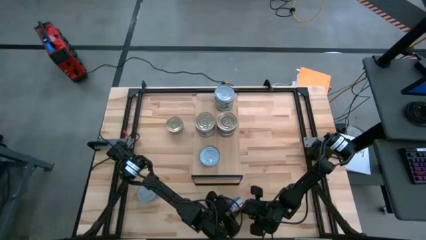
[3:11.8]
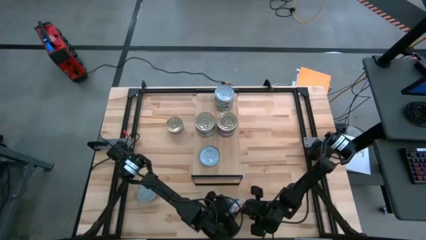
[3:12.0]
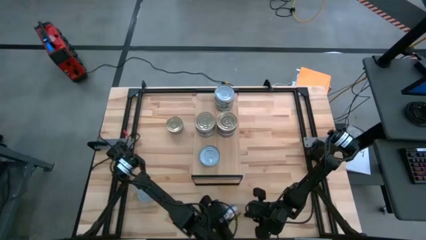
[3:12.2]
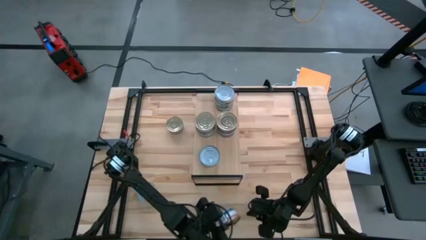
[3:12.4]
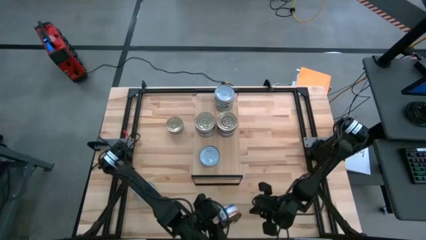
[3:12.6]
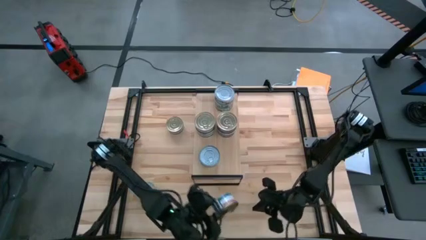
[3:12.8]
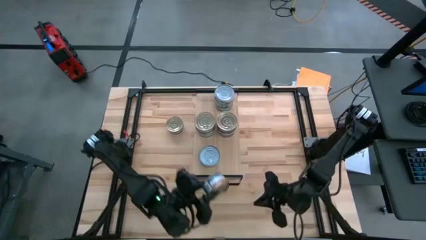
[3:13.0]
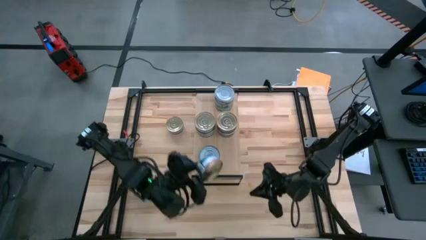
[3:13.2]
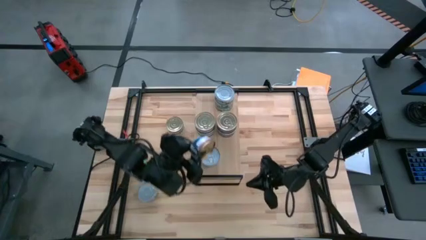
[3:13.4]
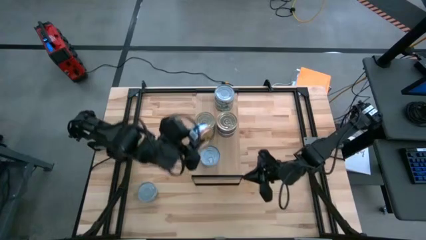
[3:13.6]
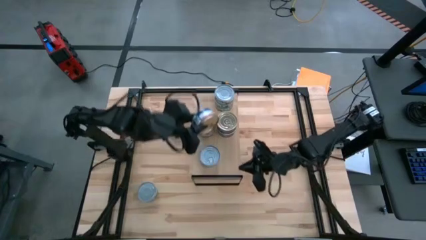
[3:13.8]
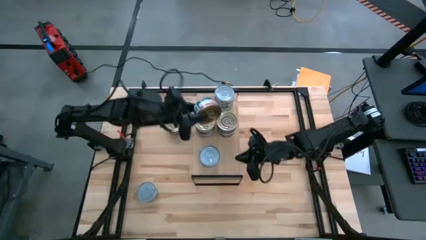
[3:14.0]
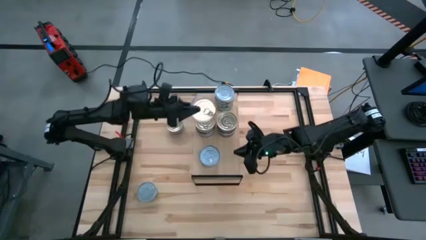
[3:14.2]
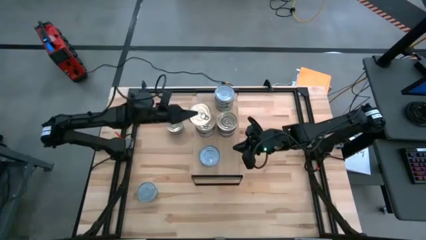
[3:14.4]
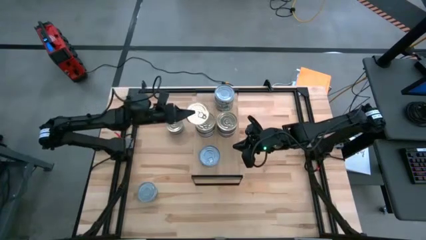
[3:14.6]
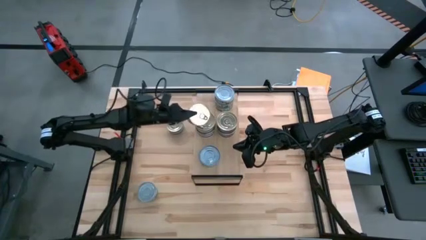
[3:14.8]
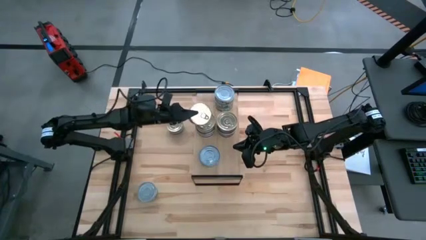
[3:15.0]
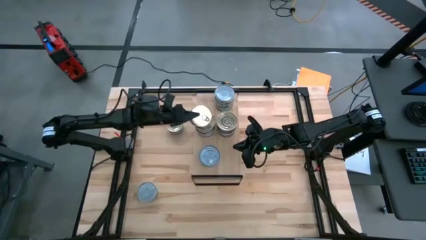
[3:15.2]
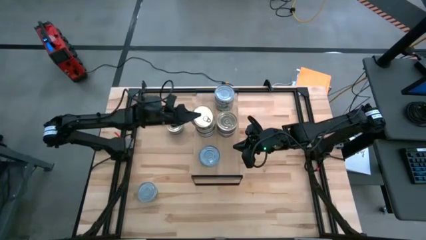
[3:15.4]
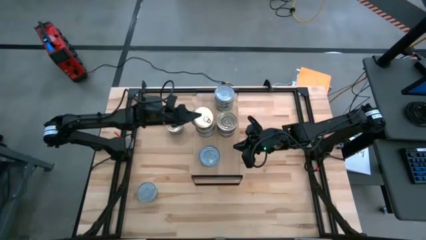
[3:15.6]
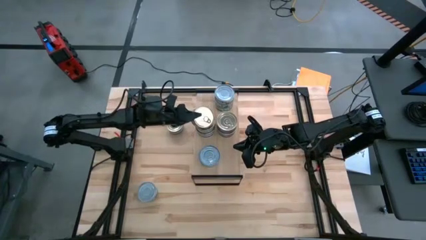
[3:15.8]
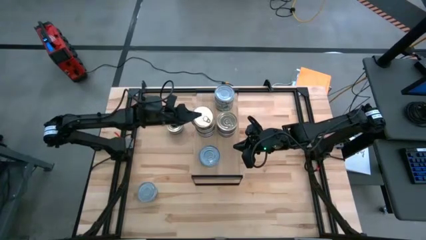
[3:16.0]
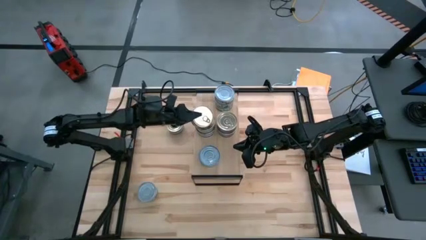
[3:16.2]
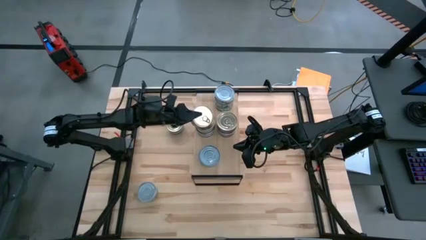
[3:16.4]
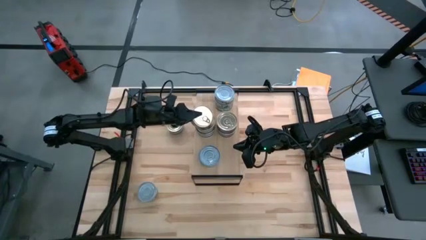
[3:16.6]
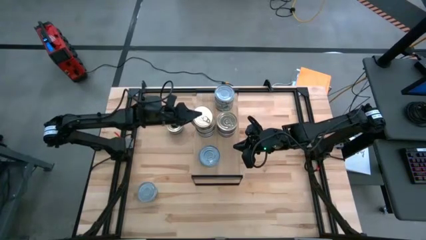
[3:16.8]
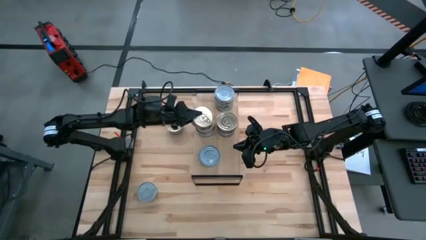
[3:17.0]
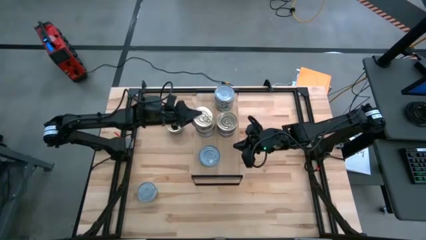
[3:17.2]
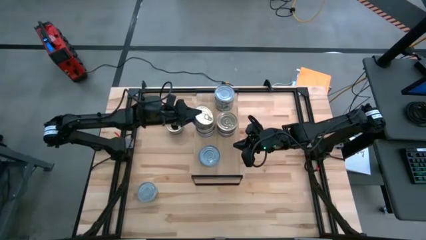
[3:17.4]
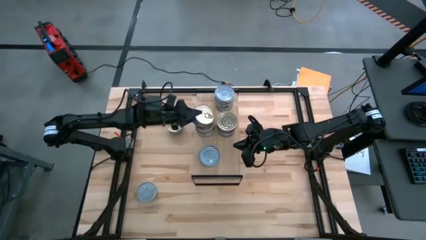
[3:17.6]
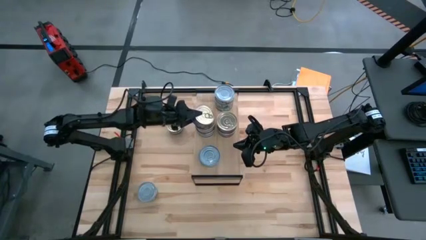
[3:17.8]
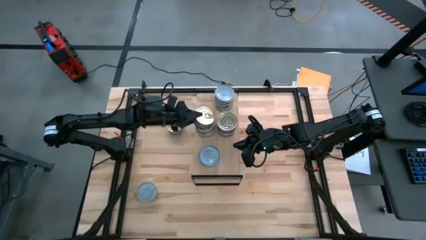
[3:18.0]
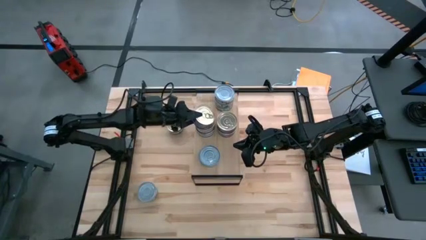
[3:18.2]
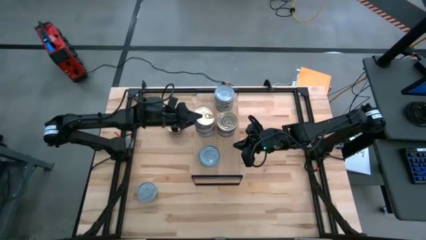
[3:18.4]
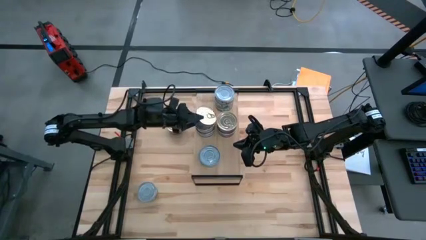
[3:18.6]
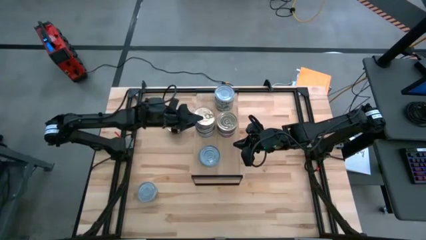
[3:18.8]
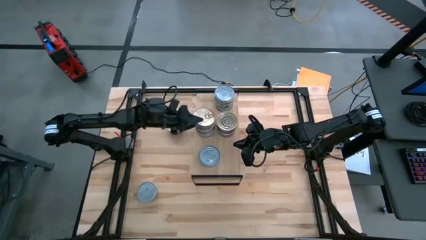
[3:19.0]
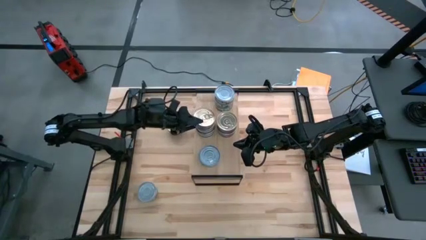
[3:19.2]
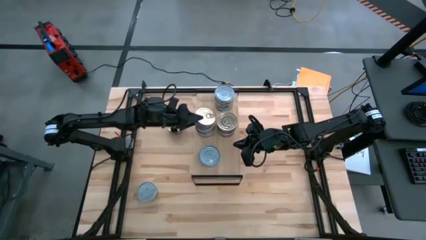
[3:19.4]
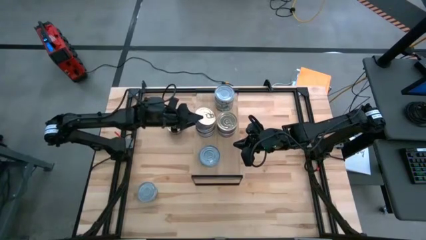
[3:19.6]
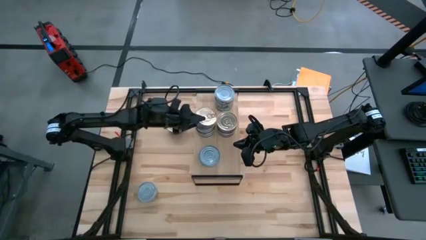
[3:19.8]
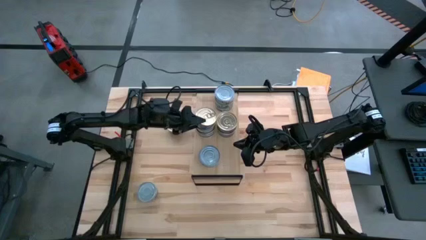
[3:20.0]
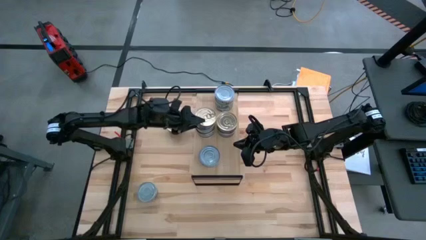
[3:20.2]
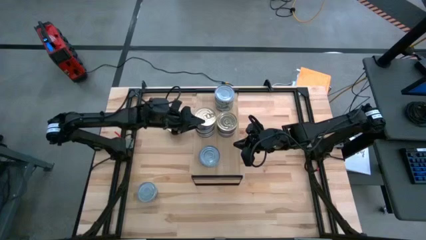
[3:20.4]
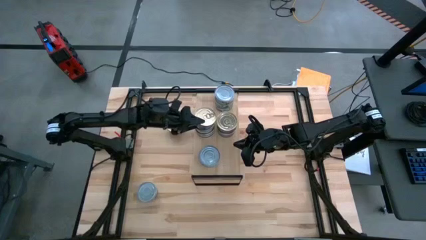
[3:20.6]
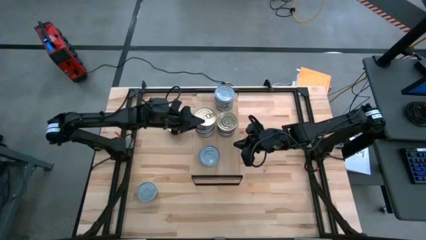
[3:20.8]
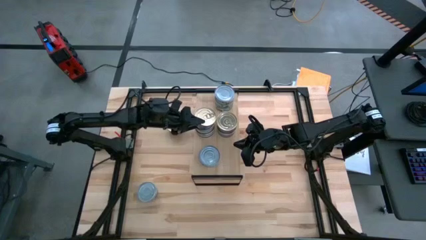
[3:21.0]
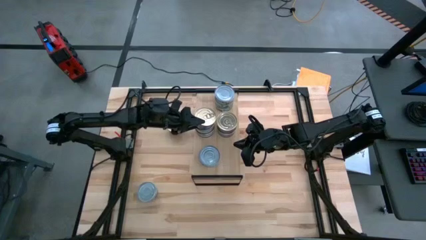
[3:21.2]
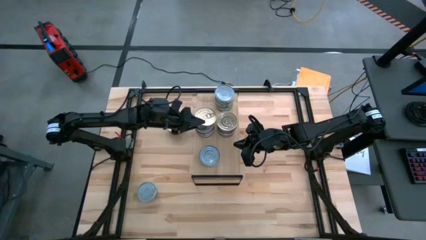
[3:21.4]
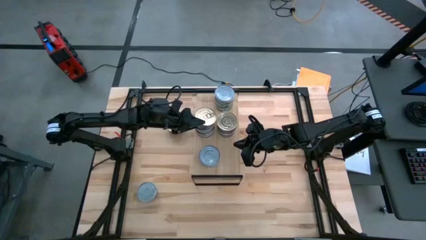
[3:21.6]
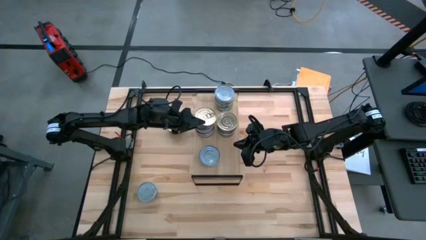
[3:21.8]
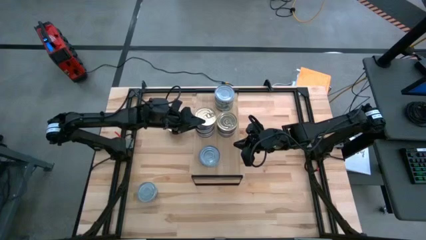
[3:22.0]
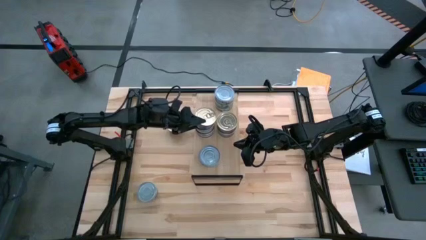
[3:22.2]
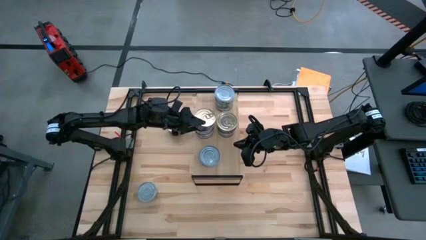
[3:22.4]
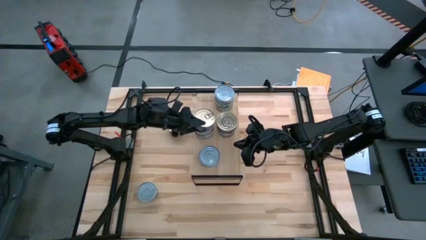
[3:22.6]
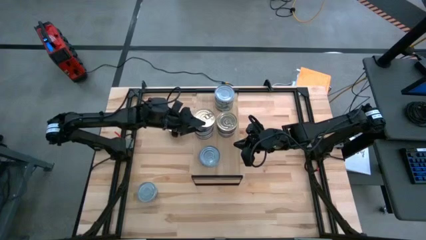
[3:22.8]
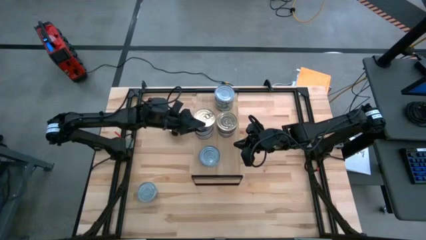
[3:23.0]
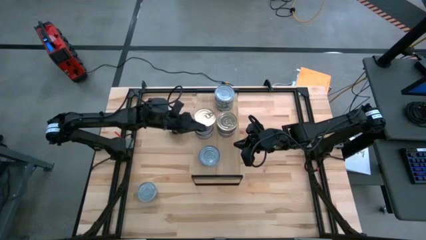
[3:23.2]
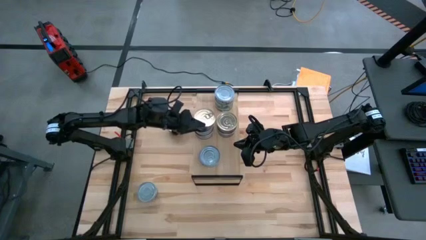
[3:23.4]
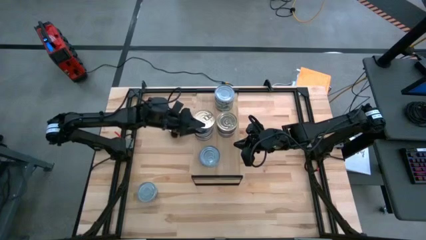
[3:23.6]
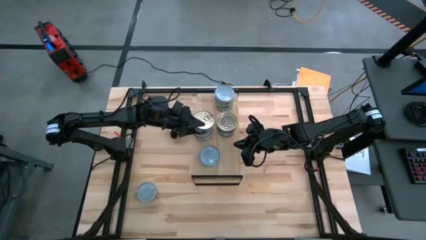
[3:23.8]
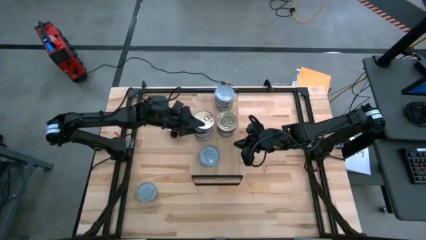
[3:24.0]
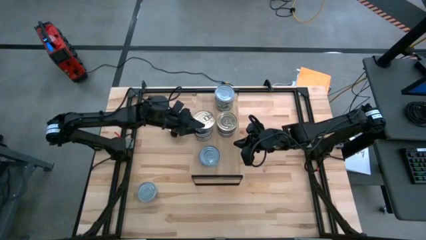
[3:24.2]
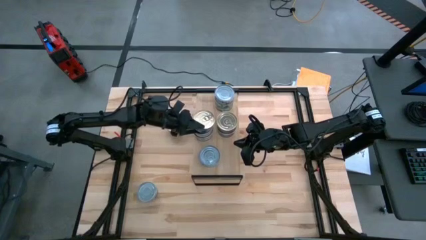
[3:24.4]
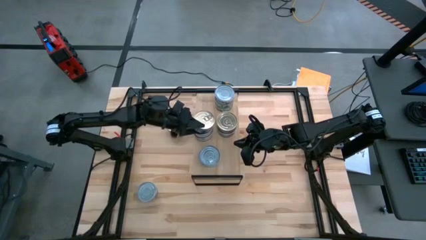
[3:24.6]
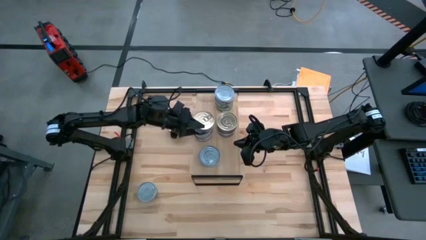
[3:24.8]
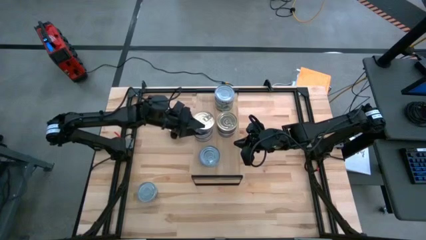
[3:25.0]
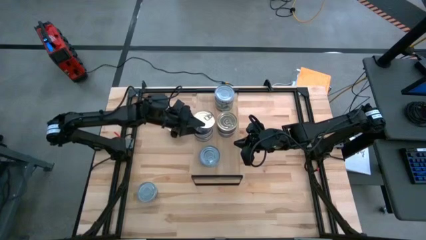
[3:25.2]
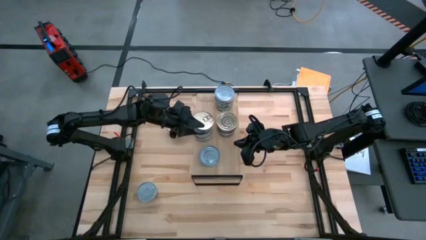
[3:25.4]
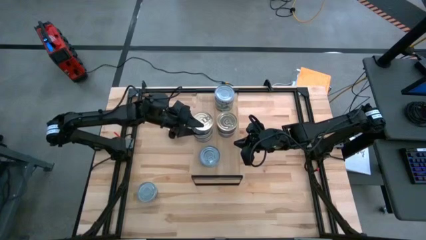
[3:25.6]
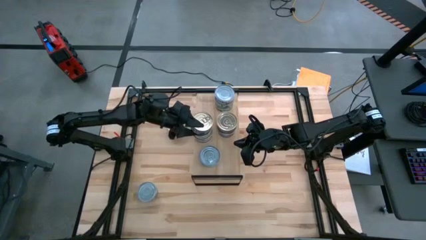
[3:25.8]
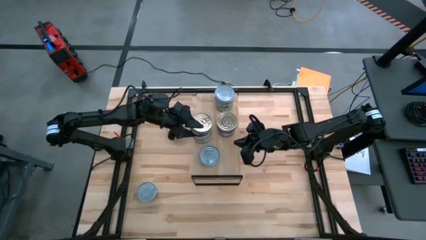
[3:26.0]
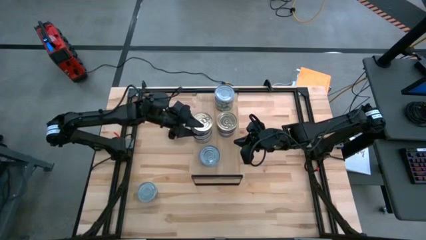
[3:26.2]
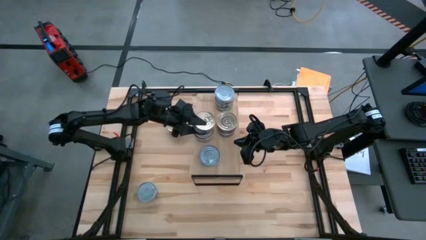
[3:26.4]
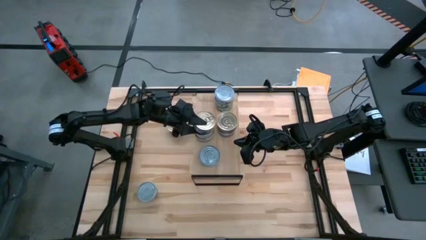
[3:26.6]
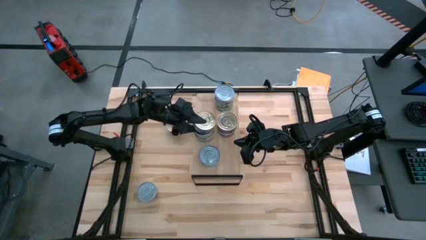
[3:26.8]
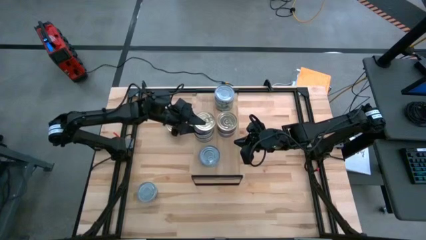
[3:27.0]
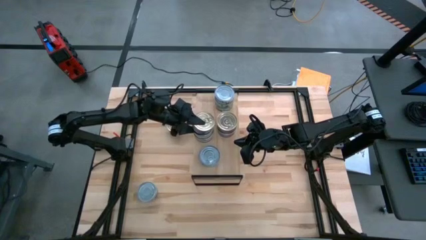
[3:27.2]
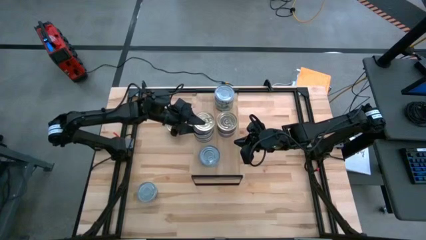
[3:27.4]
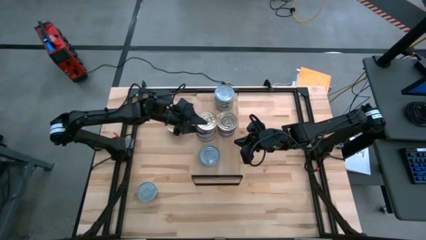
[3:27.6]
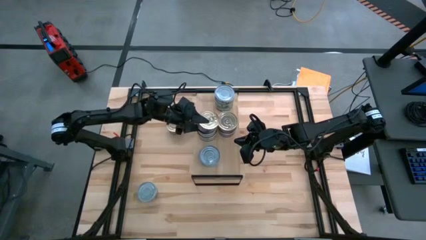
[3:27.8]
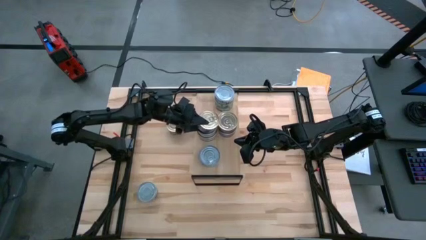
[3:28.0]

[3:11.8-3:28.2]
Task: Stack canned seafood by type on shelf
Stack the blue-pink tuna can on top of the blue-pink tuna can on the shelf aligned with the other blue-pink tuna can
